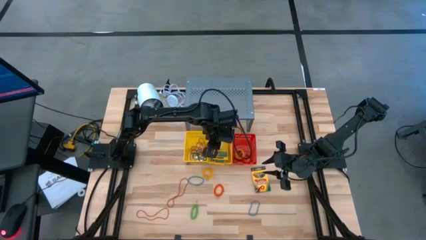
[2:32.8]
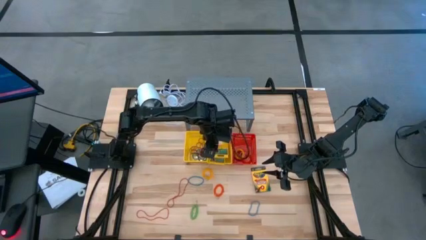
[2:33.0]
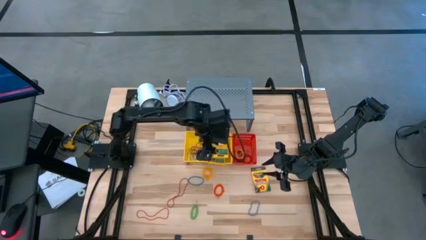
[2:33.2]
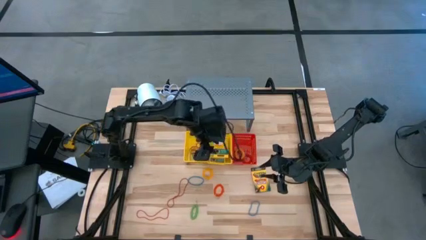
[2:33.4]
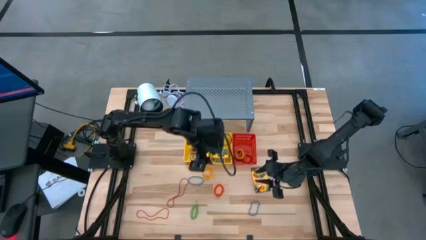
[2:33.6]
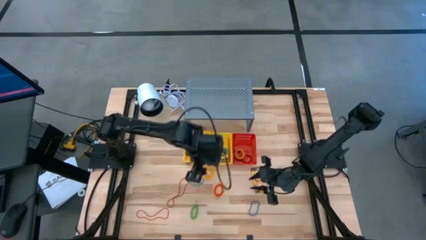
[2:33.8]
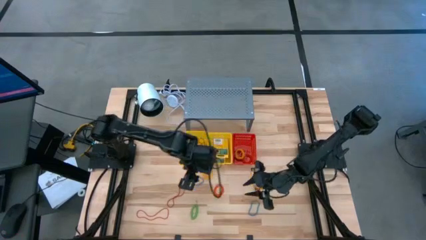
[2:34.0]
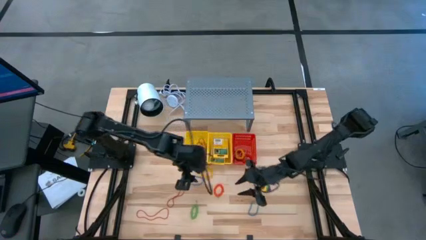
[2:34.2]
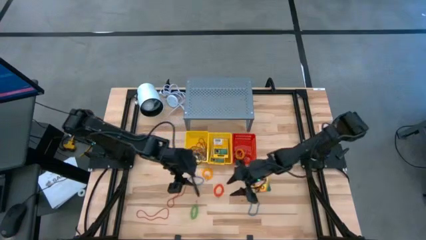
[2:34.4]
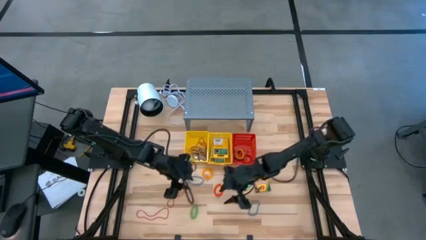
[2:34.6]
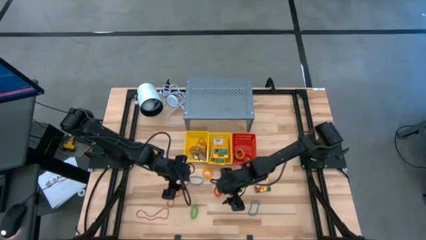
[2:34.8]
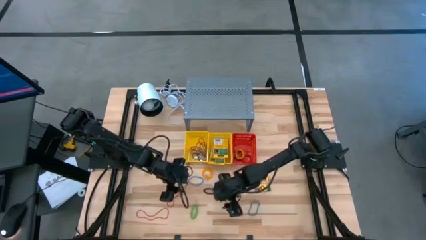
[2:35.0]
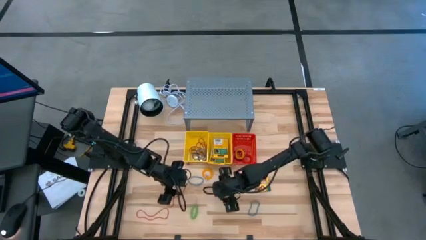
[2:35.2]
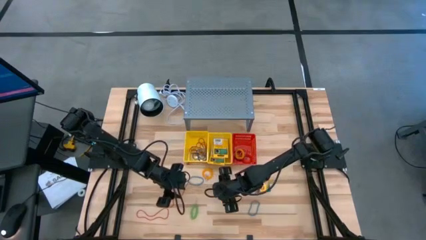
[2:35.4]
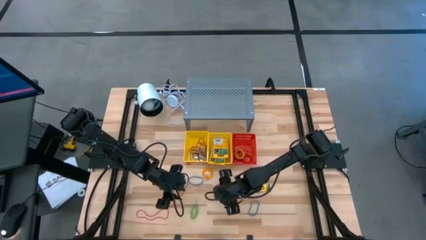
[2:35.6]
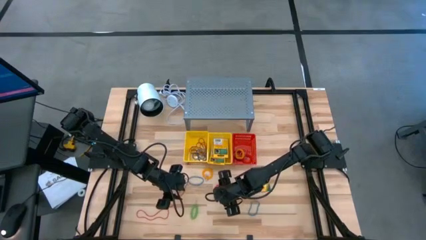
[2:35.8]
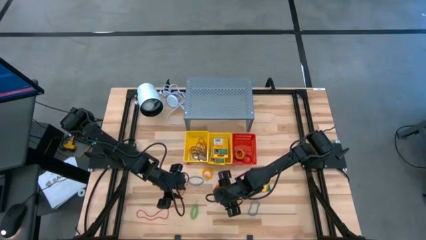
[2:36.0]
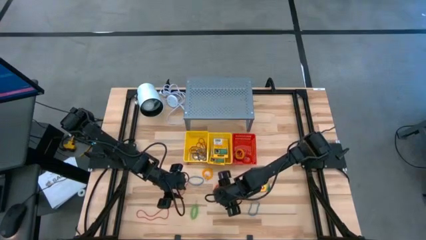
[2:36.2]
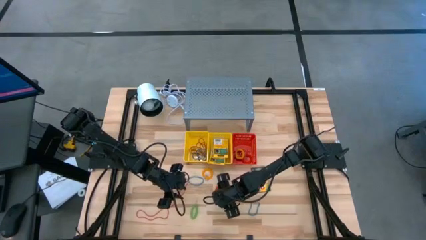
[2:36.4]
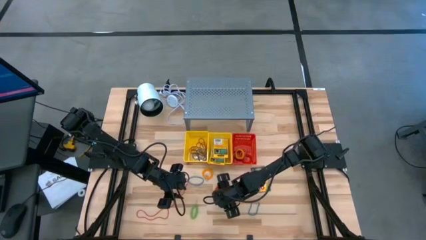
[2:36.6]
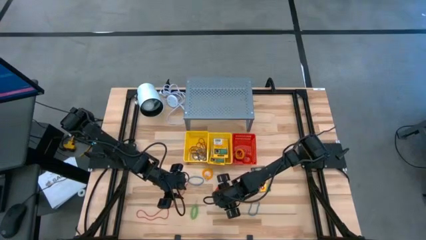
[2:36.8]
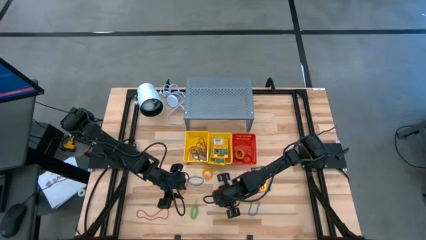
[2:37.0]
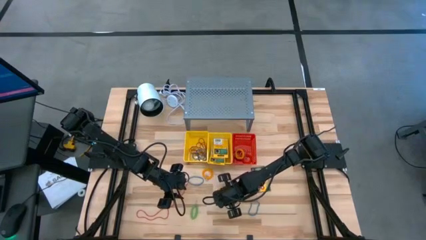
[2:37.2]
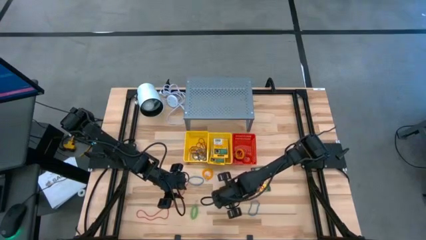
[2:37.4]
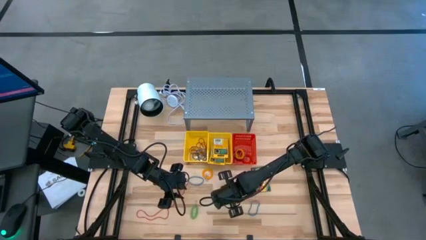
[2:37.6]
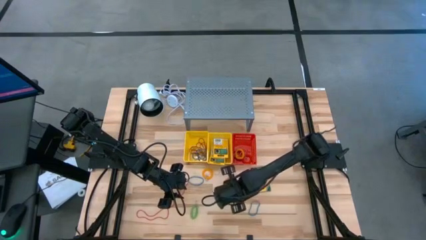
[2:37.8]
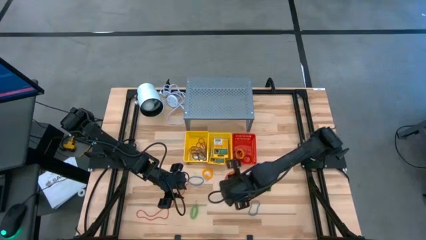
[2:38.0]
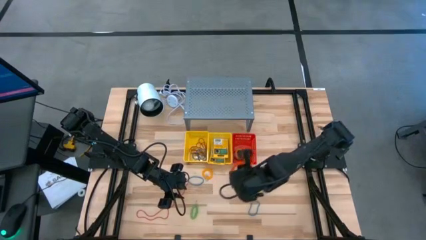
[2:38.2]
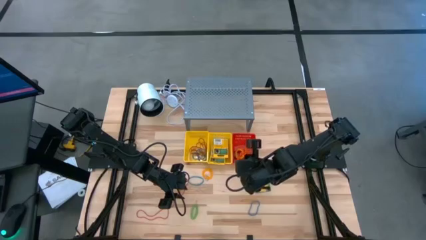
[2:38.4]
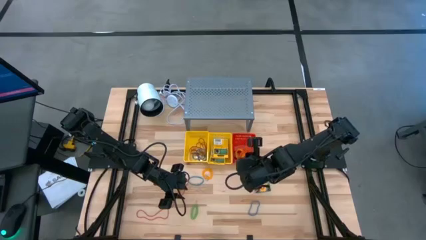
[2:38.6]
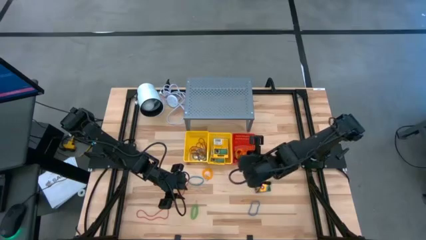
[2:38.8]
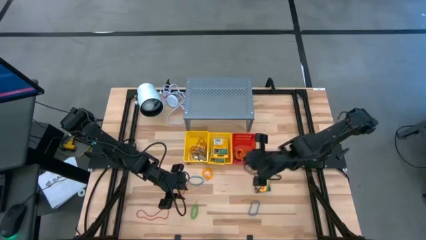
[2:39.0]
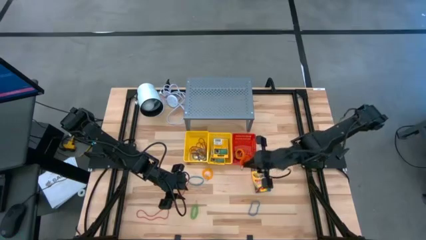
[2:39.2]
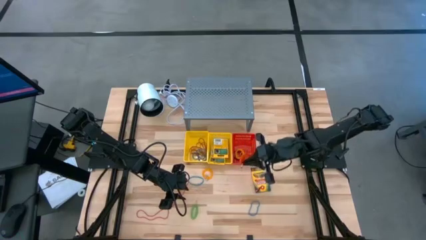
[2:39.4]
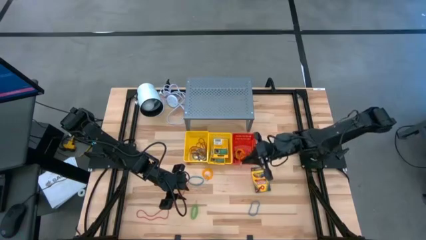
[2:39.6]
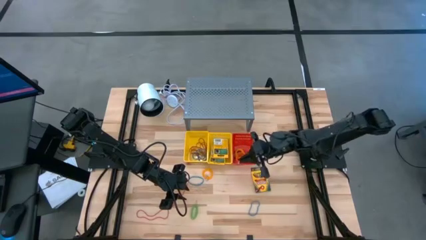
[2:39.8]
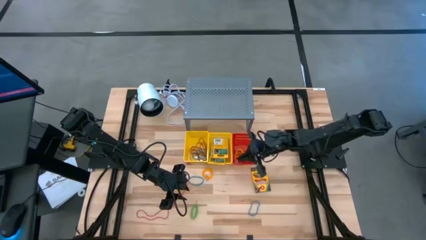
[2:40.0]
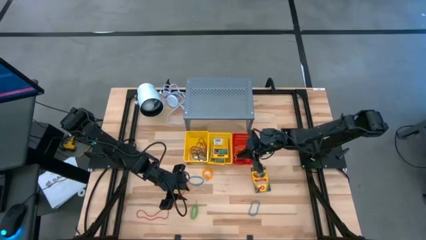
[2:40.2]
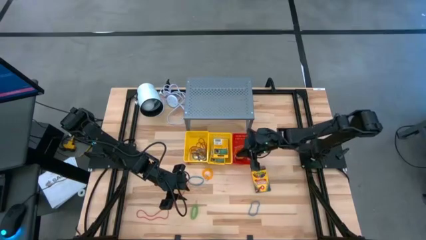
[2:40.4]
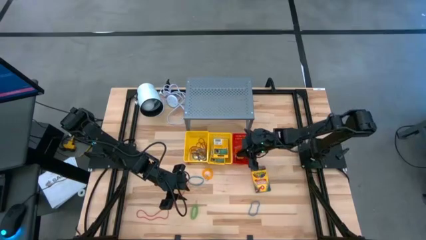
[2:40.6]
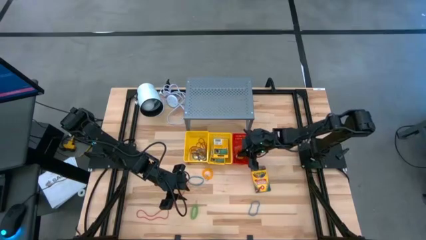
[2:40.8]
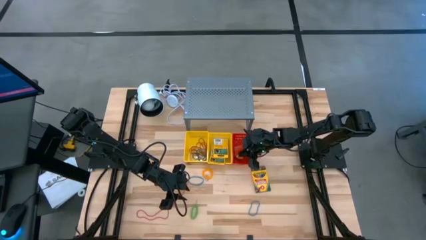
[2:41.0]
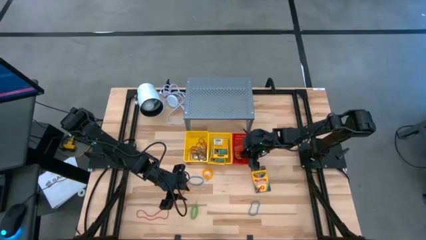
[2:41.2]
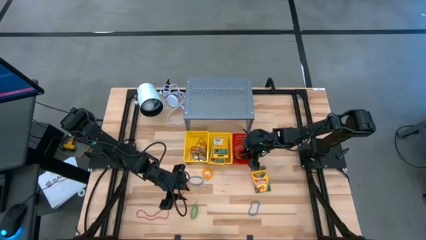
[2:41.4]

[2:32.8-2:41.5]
Task: Pick & Place Office Desk Supplies
Put the orange spring keychain into the red basket

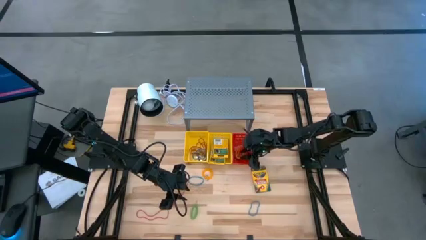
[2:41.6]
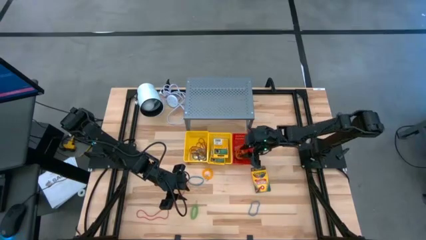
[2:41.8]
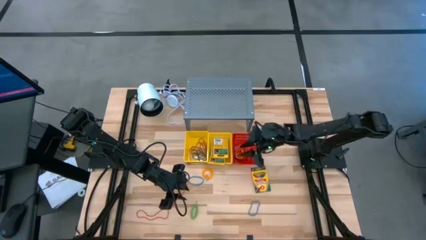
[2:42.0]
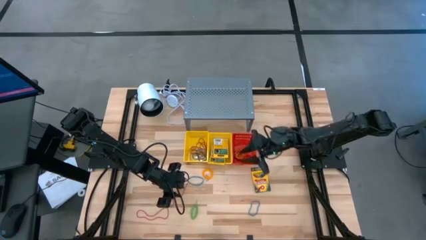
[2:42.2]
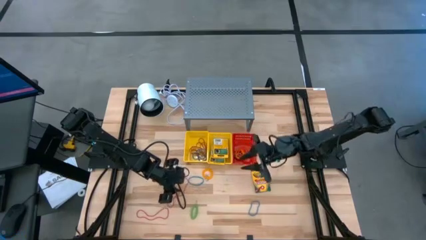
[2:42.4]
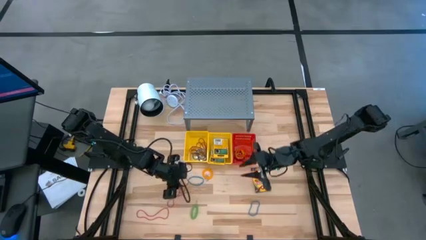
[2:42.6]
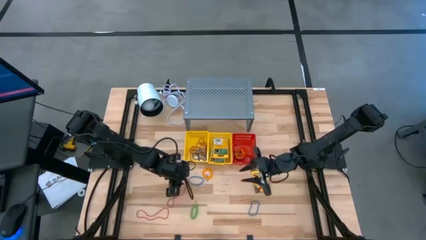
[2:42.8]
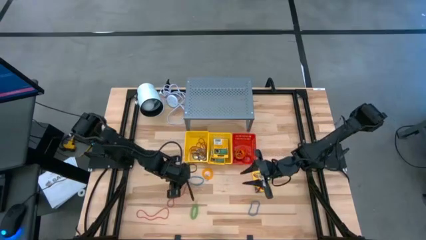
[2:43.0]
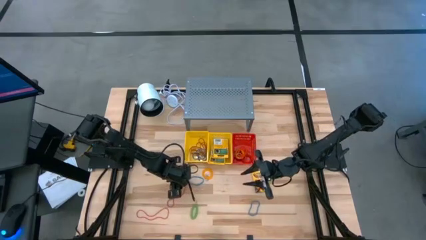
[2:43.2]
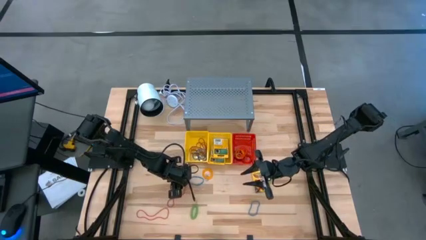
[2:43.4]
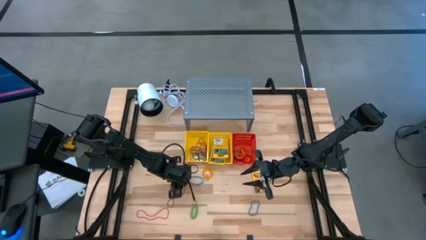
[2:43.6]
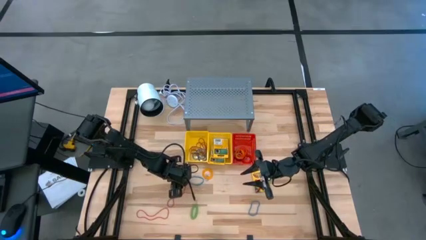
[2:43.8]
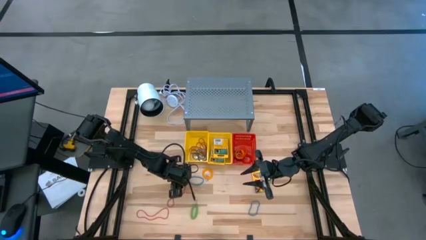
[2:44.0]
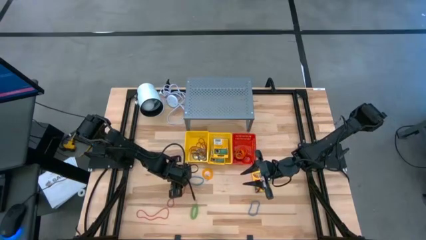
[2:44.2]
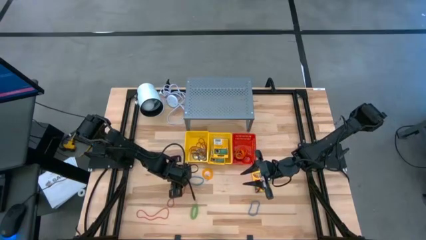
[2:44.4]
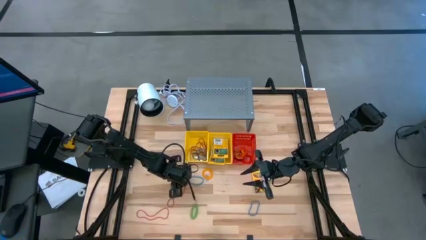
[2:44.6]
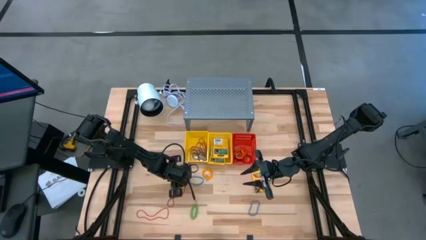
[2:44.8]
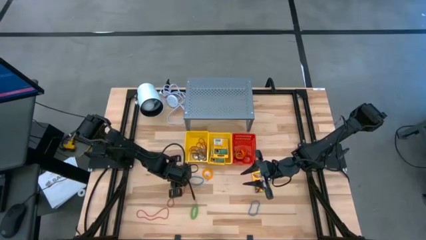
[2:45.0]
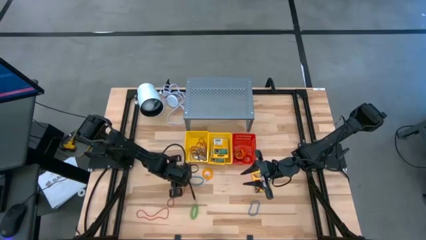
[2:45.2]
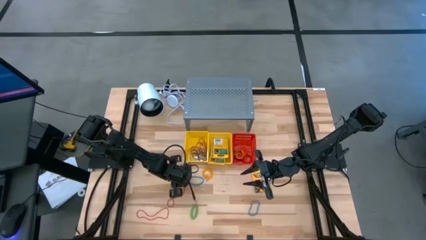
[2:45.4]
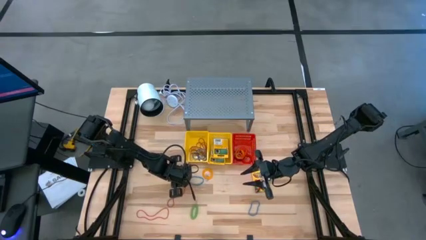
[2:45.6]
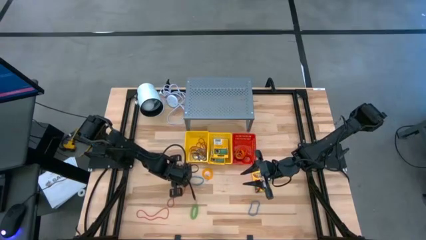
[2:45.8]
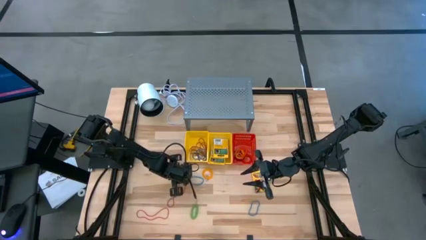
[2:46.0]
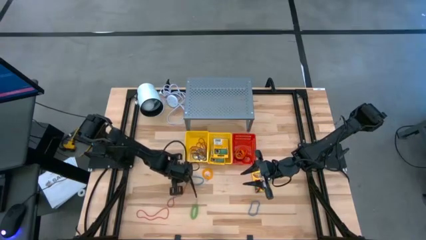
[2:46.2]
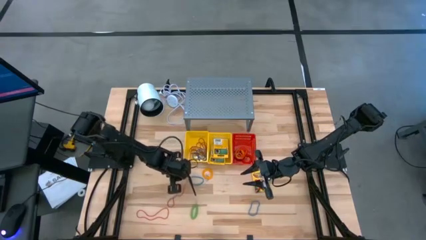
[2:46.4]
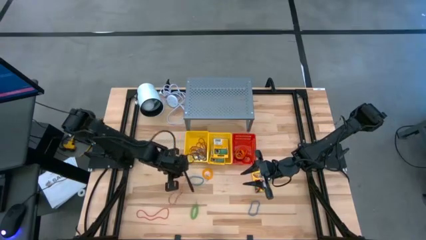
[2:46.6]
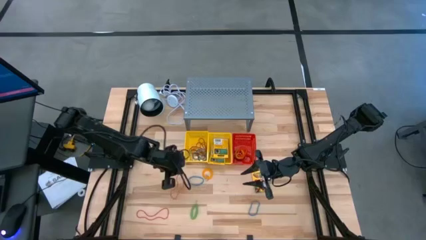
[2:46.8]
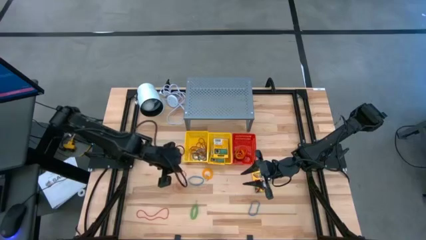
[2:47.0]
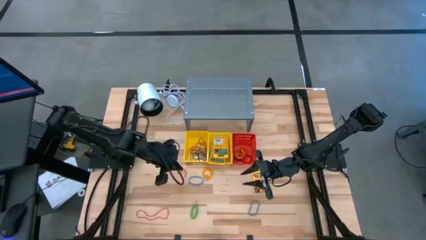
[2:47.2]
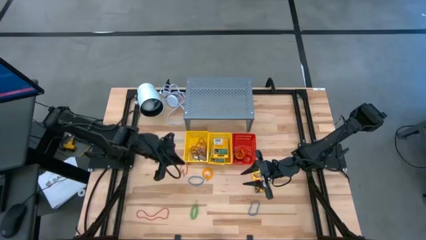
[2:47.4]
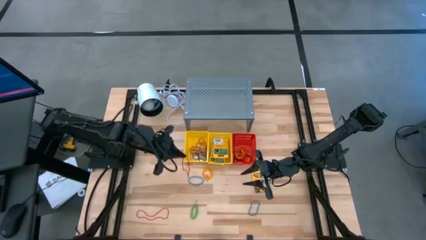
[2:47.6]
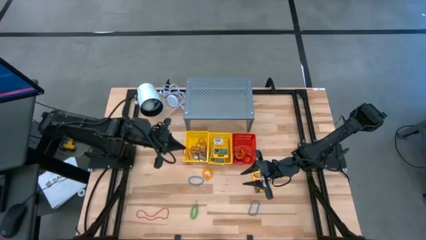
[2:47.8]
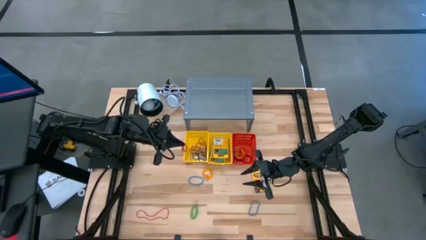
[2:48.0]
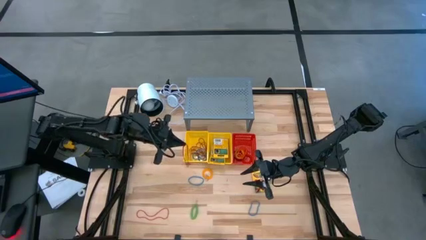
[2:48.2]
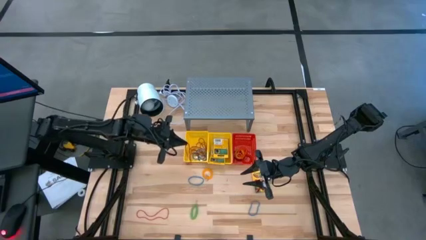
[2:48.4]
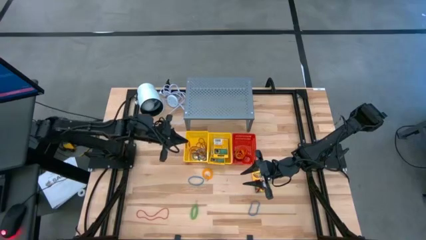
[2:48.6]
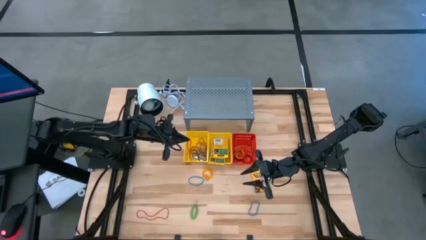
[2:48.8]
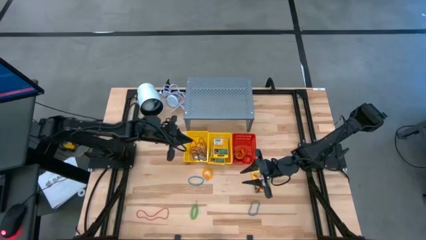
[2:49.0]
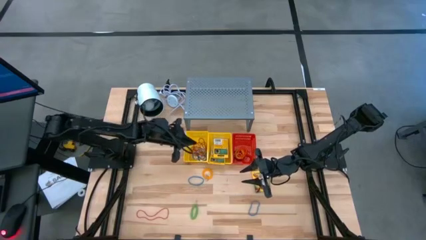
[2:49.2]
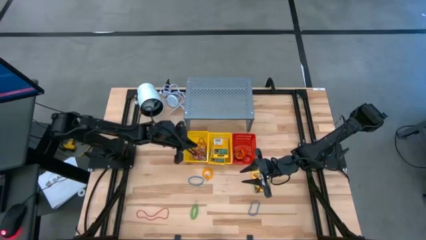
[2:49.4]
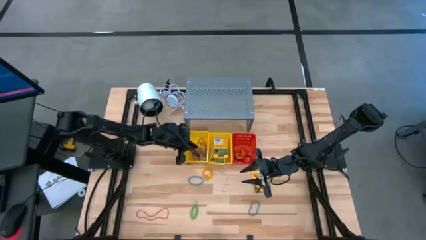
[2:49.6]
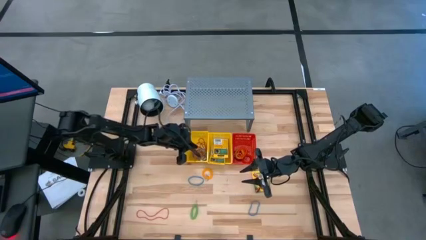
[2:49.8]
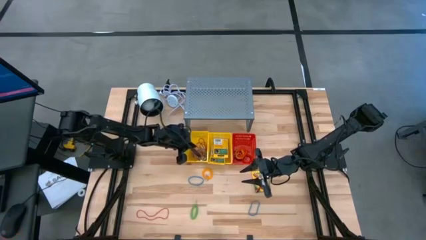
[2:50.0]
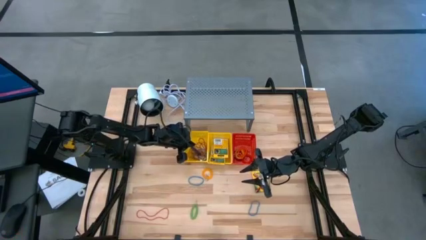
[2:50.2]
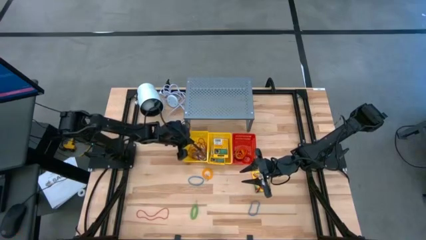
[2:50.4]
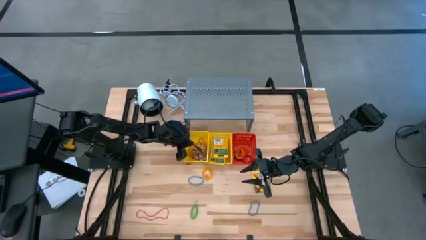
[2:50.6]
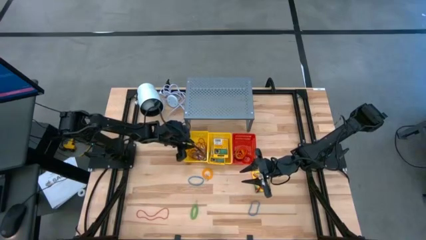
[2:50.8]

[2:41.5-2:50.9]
Put the red rubber band into the left yellow basket
